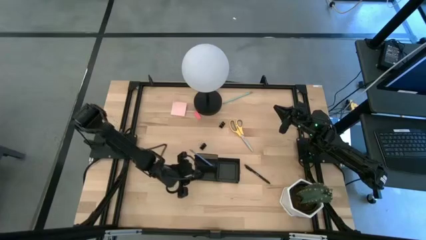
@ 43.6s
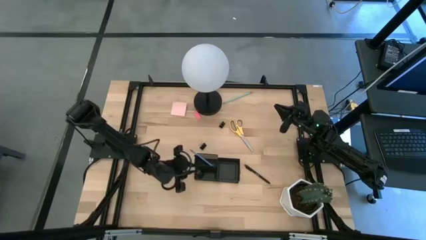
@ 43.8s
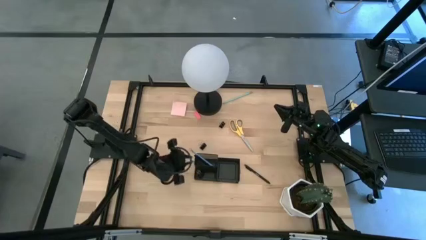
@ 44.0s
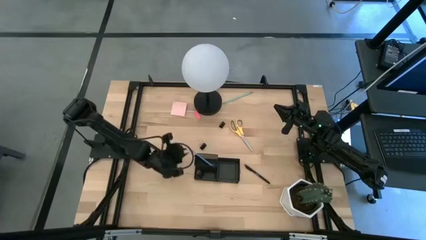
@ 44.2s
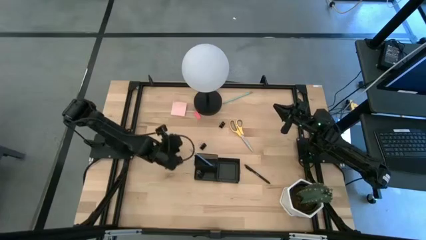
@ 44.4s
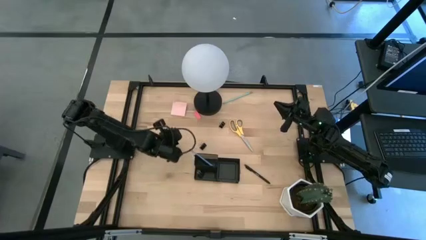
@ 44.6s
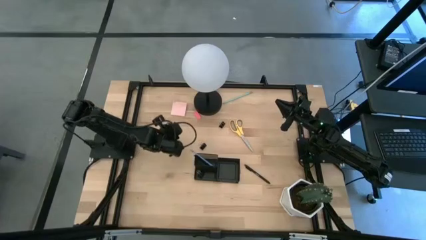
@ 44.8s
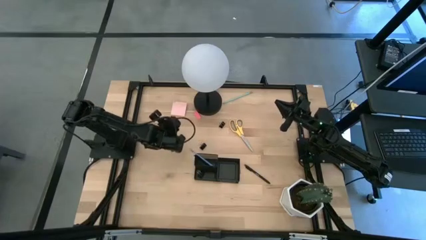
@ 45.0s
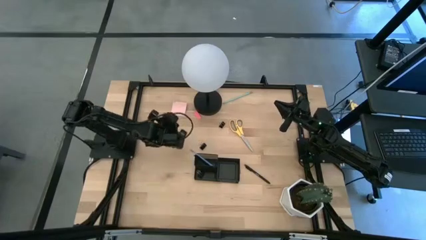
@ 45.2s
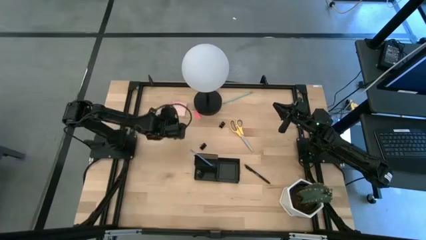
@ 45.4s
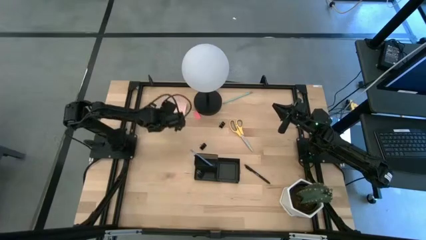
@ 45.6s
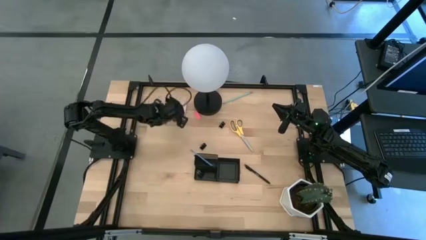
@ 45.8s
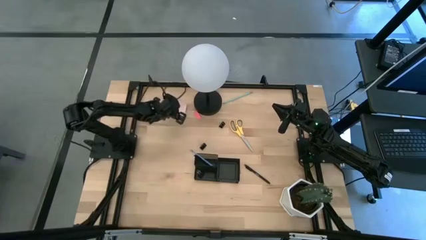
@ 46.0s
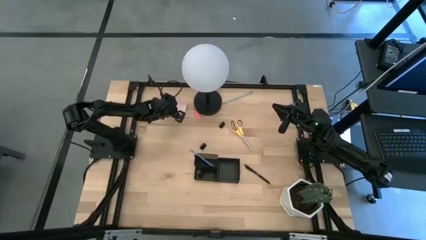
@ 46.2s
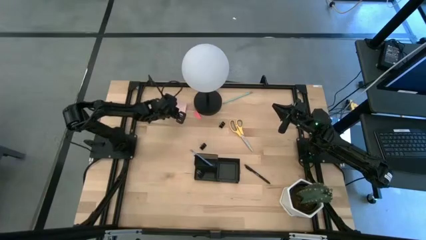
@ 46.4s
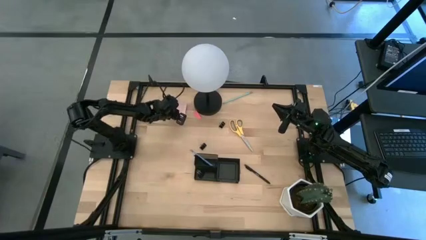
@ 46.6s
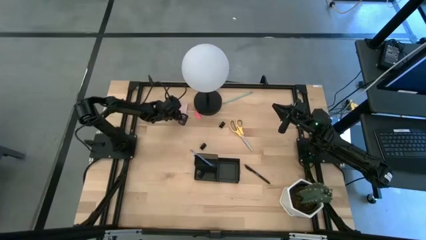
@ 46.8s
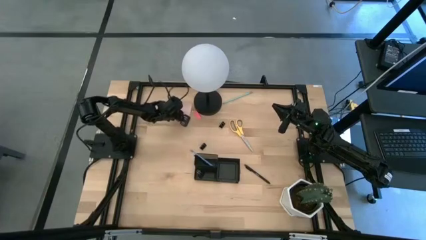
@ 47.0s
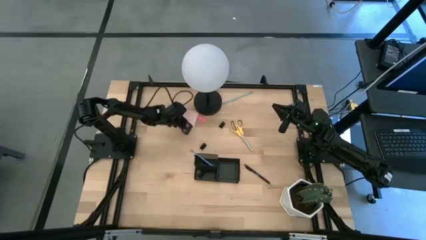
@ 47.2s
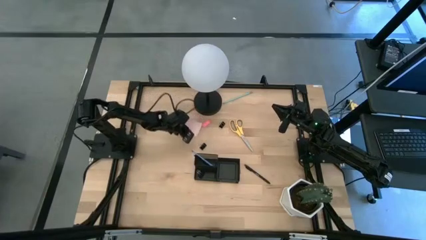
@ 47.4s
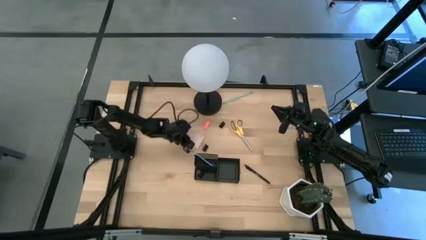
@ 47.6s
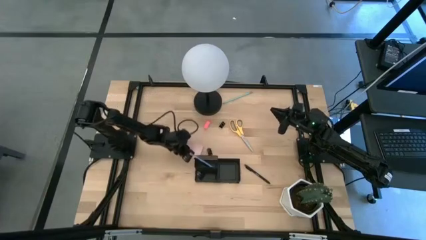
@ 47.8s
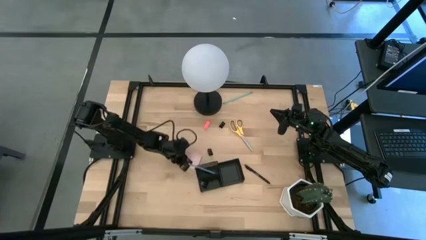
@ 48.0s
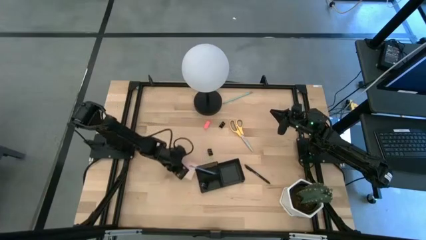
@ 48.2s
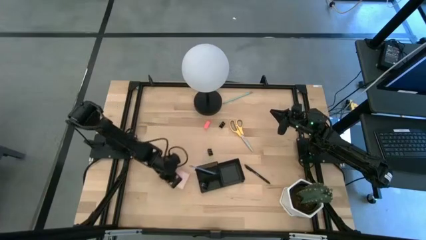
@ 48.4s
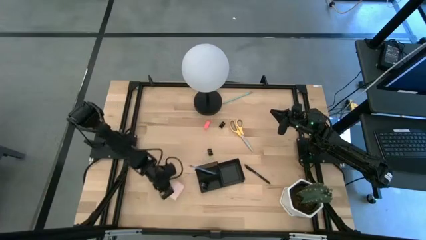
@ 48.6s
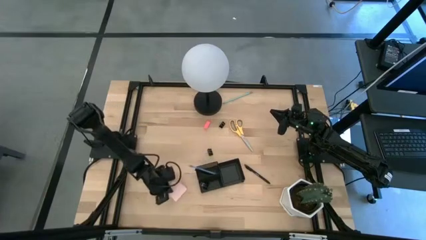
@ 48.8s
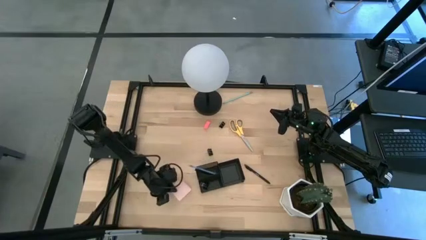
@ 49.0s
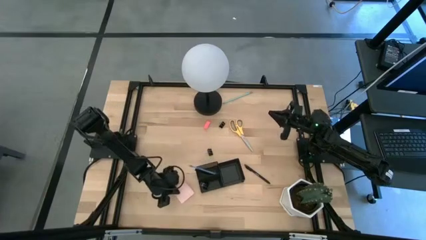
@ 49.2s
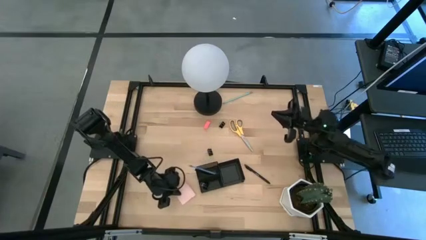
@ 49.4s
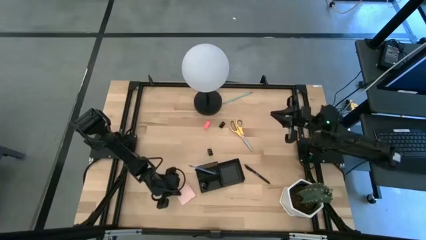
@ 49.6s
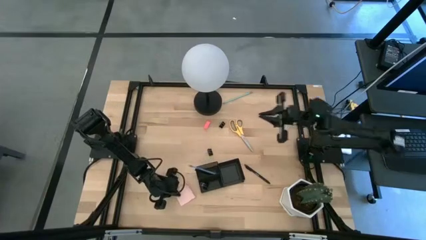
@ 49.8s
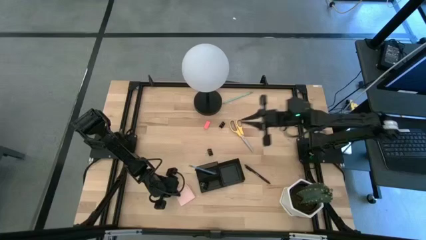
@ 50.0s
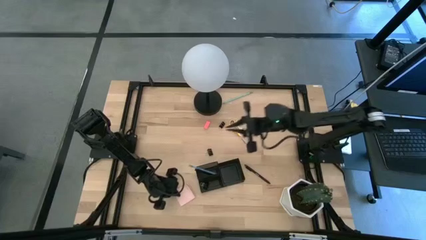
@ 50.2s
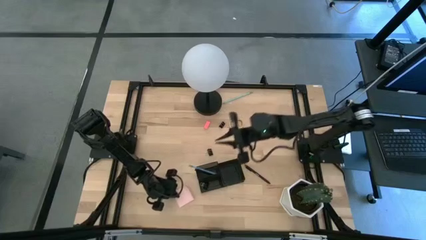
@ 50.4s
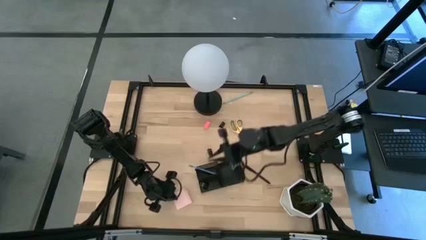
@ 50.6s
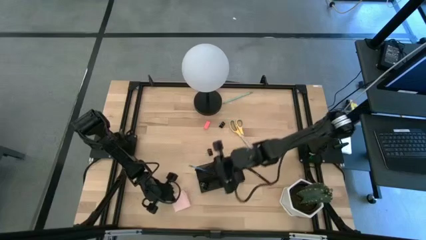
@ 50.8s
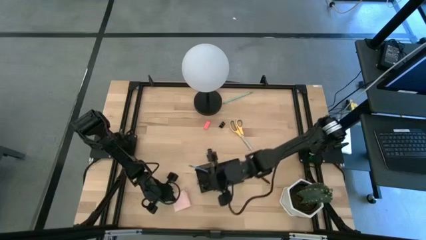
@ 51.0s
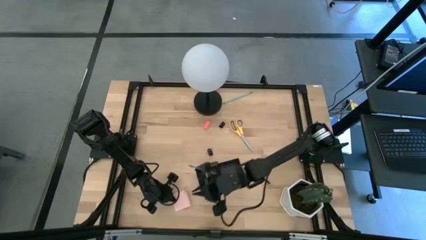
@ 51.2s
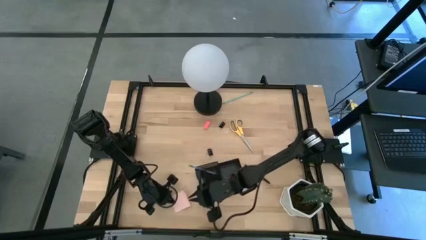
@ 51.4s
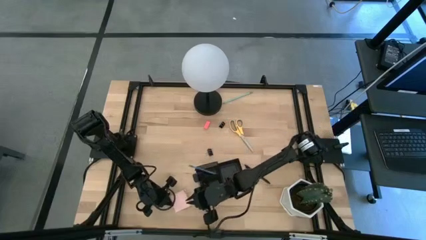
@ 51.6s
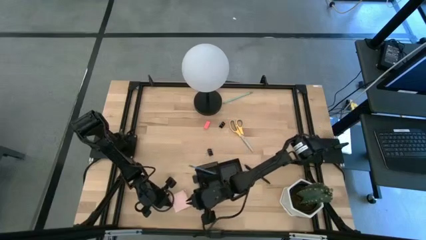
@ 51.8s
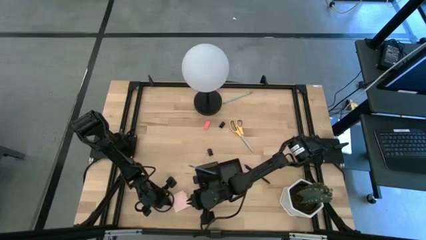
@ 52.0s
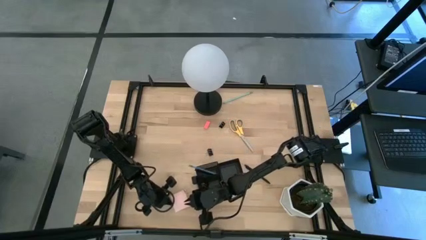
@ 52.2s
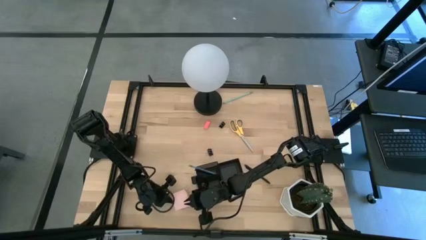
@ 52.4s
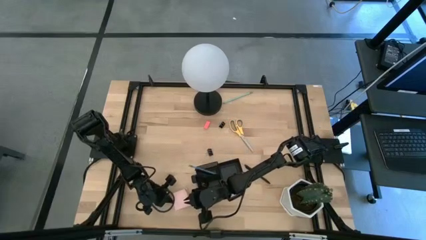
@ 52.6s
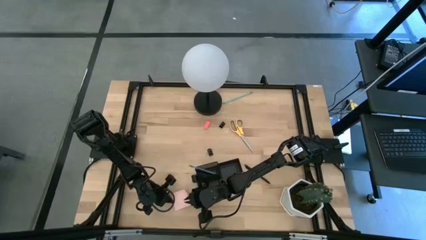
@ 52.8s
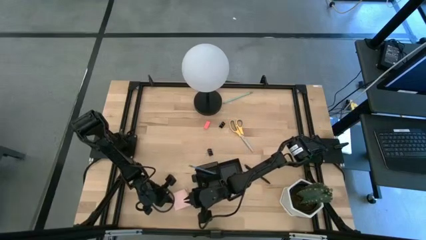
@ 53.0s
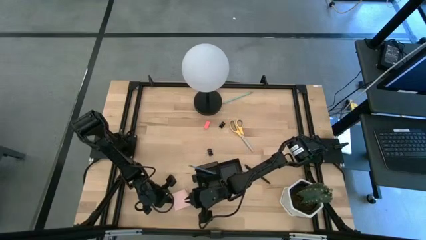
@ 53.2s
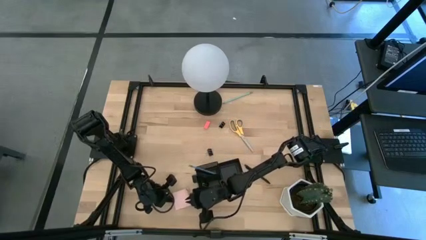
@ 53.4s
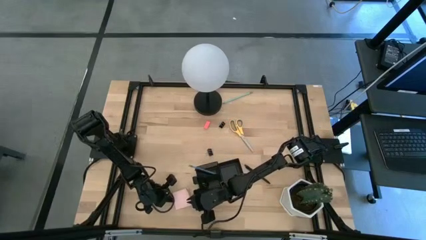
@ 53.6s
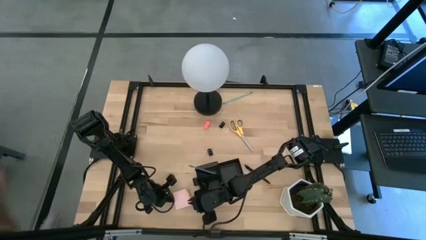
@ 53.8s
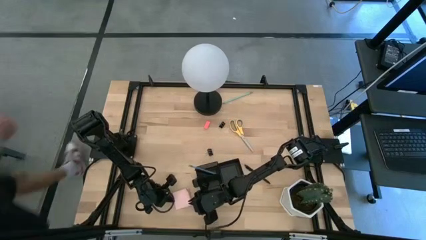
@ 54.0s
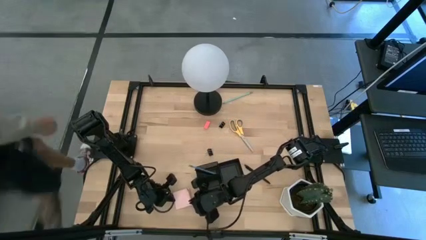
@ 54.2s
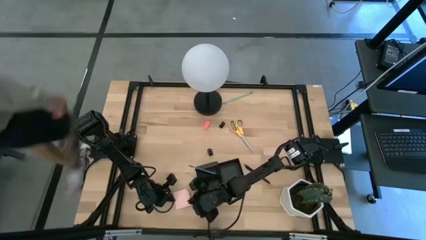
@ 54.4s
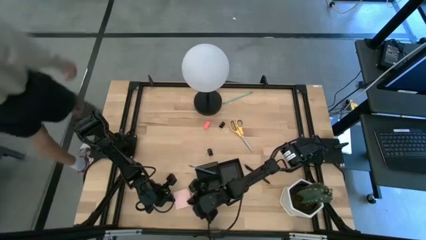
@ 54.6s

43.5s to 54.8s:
Task: Pick and place office supplies into organizer
Put the pink sticky note into the black desk organizer
